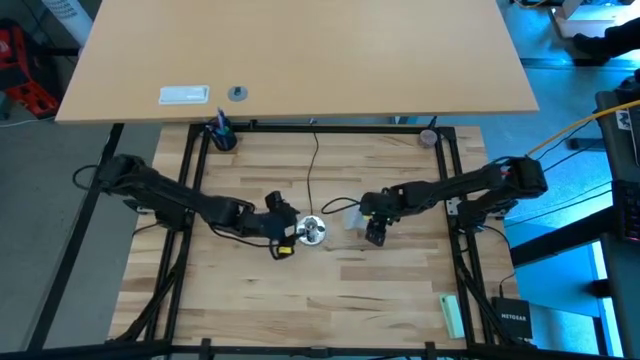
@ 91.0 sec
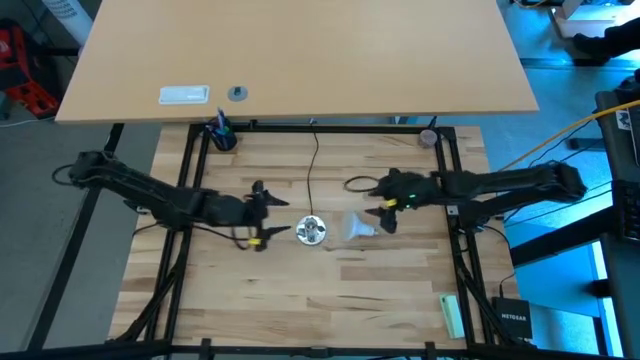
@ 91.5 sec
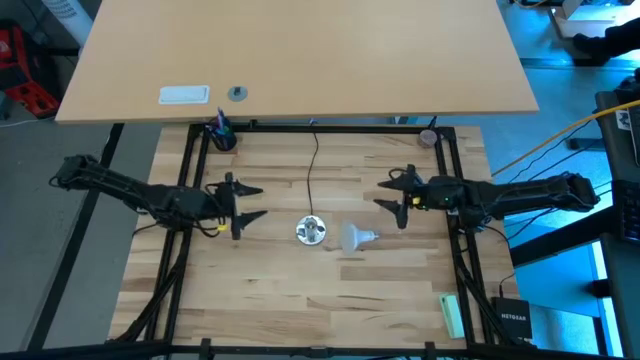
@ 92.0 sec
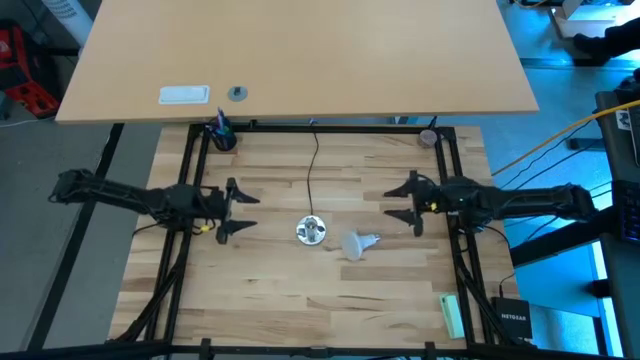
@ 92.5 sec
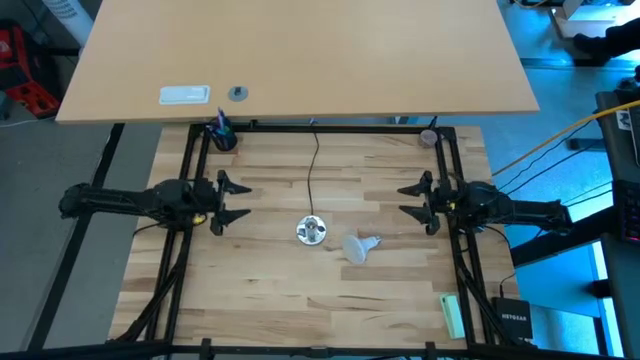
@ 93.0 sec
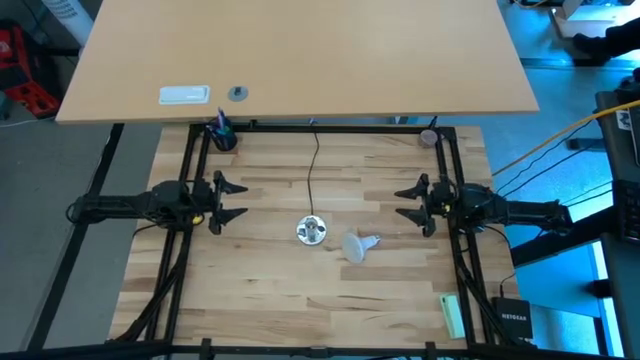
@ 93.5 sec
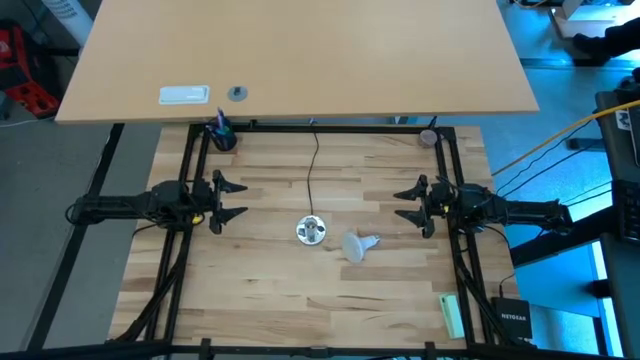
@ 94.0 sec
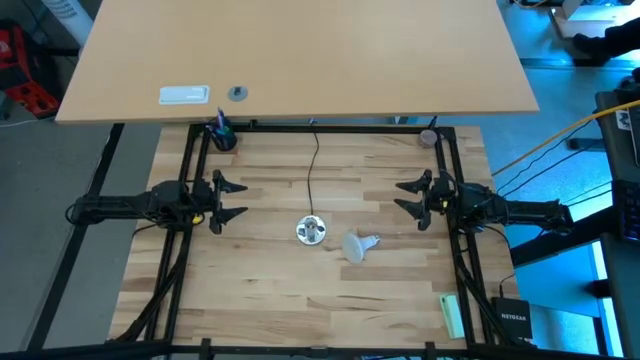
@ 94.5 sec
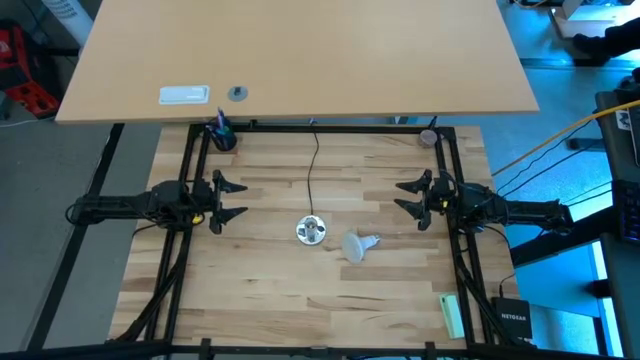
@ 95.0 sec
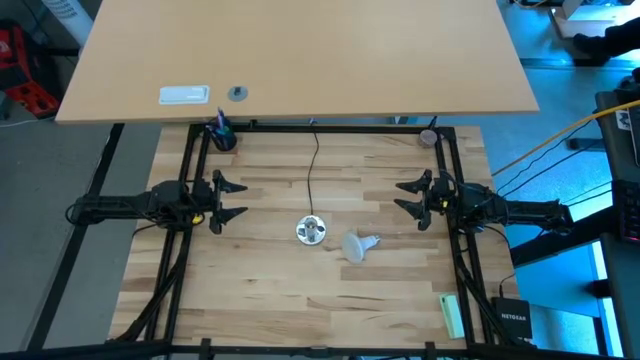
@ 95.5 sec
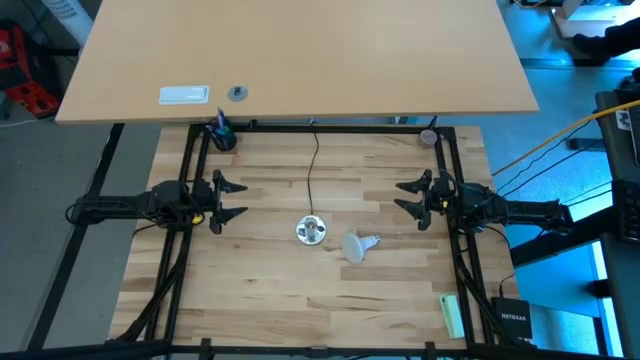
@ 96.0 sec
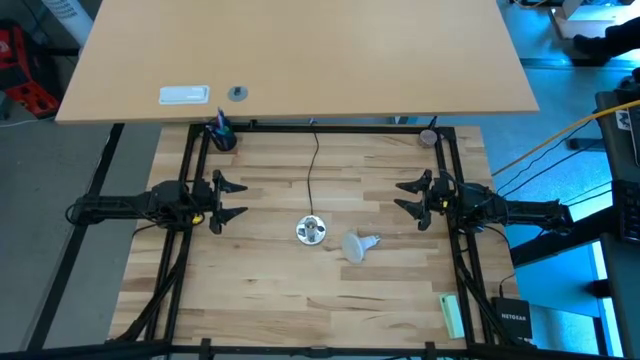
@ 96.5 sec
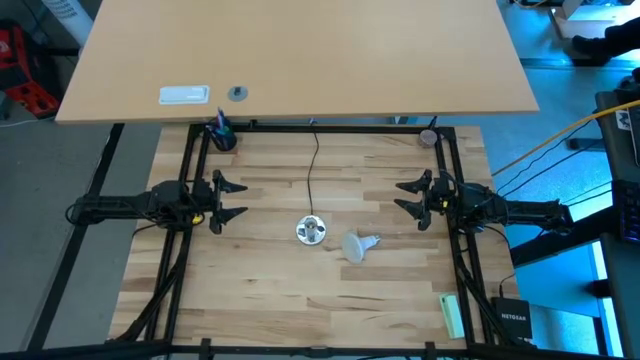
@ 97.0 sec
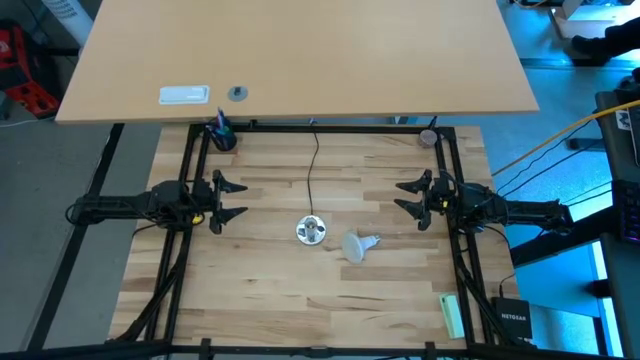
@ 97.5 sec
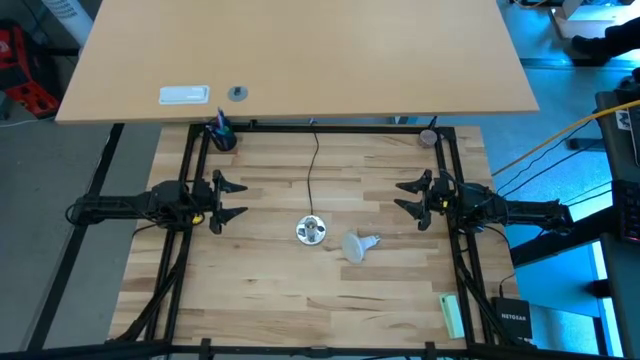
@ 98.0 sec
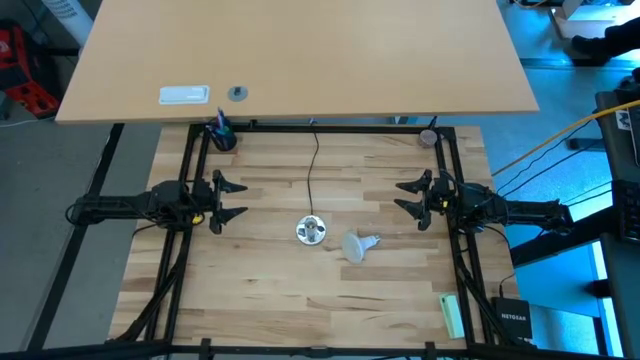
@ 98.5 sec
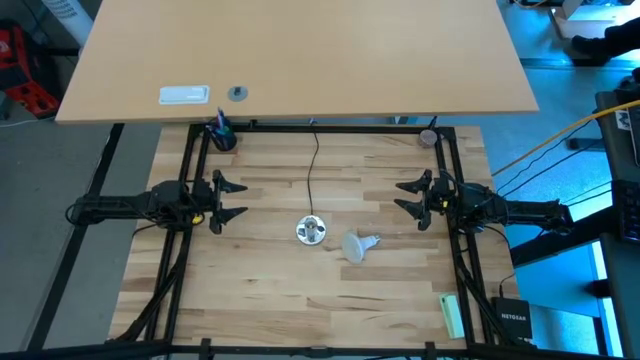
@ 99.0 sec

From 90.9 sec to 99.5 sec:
Task: Screw lightbulb
Return to Home Position

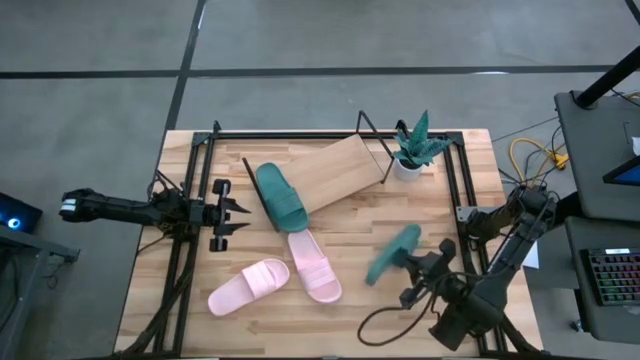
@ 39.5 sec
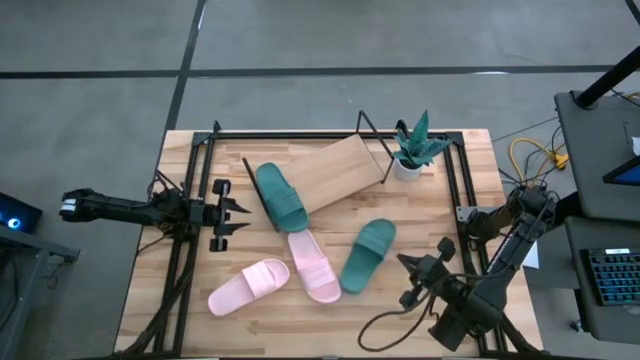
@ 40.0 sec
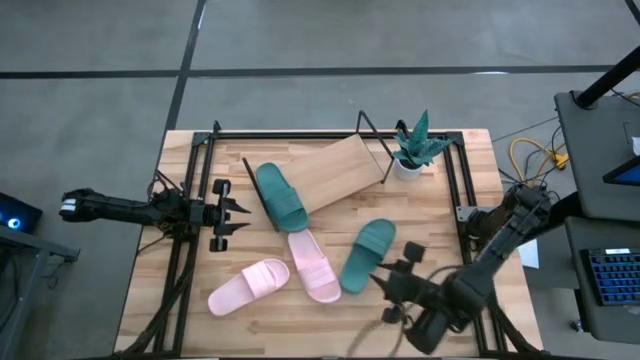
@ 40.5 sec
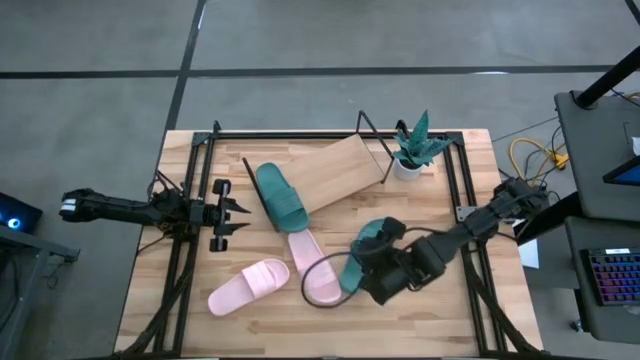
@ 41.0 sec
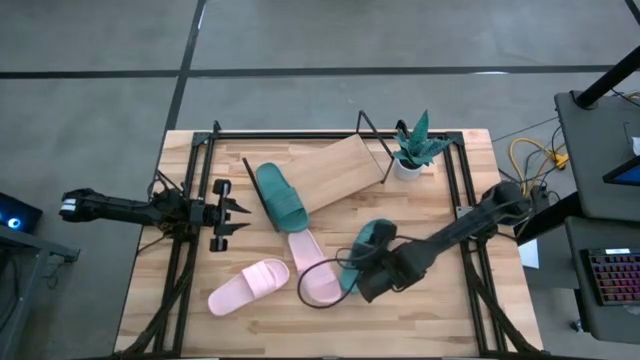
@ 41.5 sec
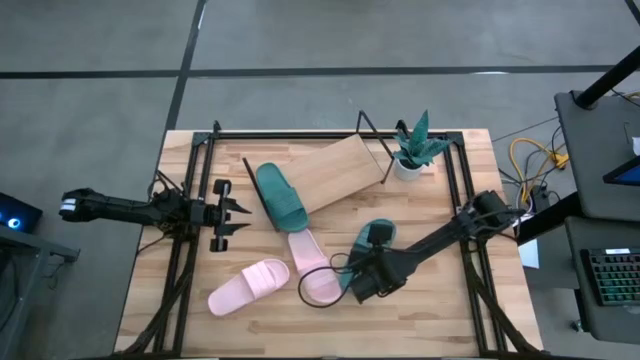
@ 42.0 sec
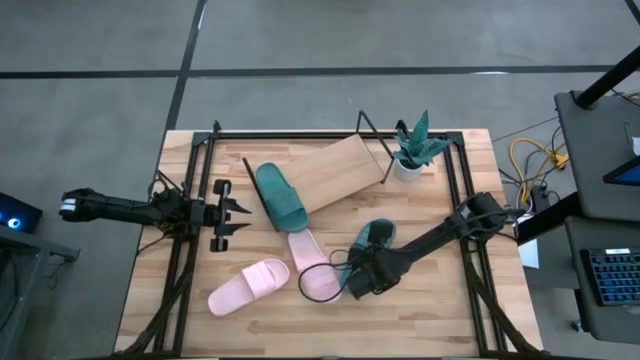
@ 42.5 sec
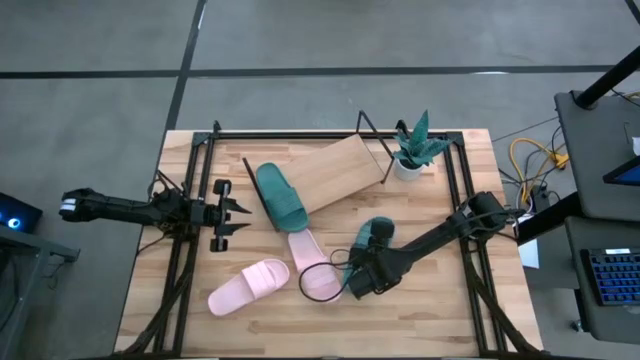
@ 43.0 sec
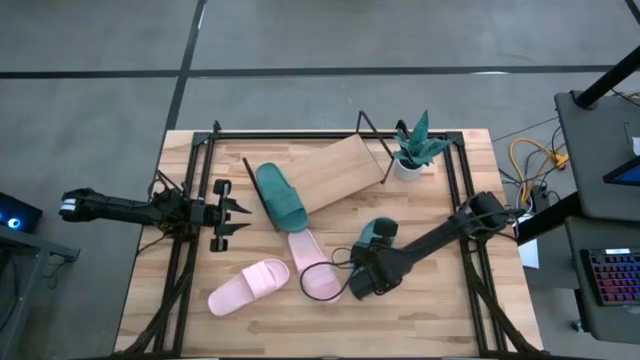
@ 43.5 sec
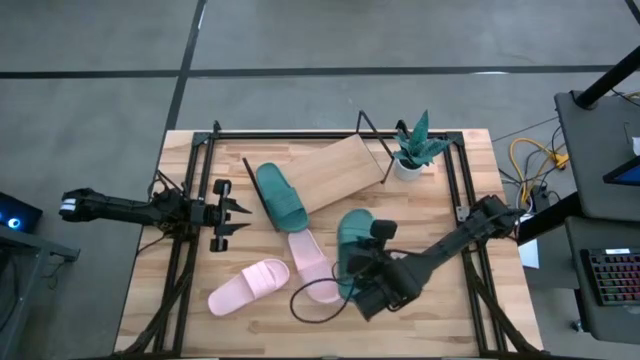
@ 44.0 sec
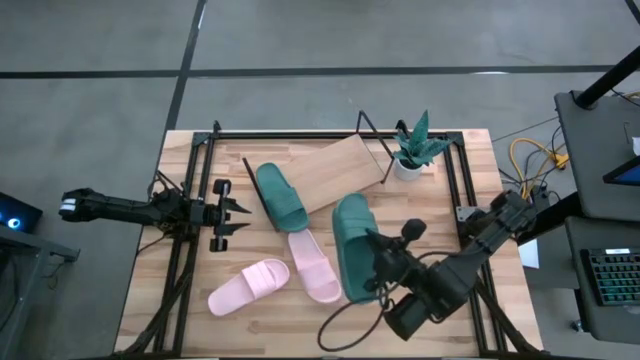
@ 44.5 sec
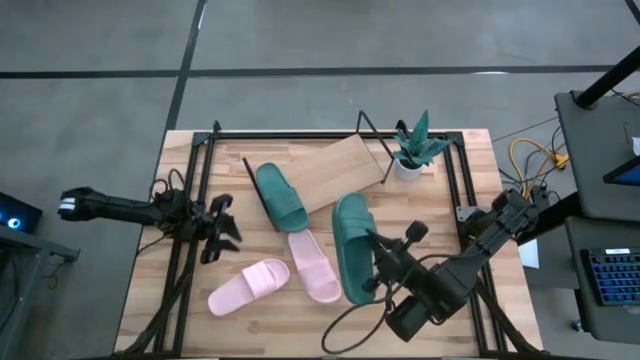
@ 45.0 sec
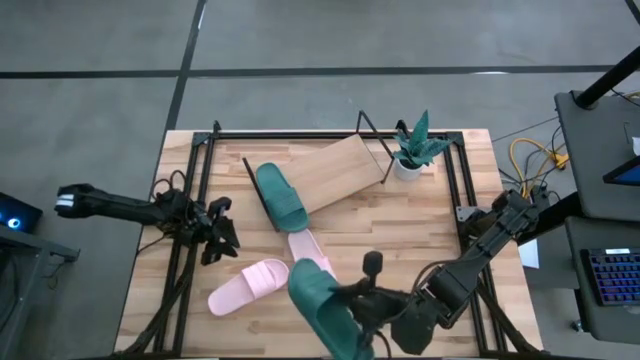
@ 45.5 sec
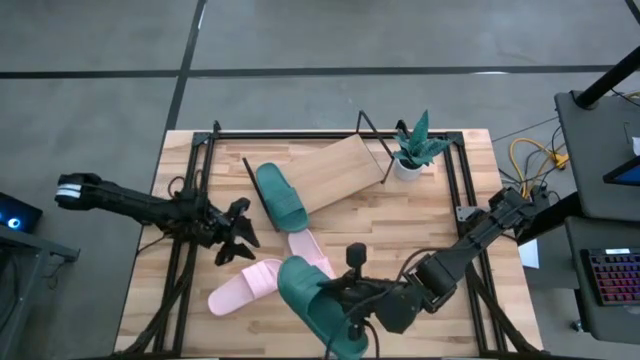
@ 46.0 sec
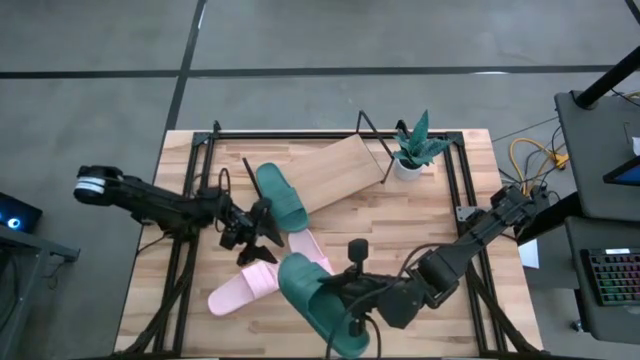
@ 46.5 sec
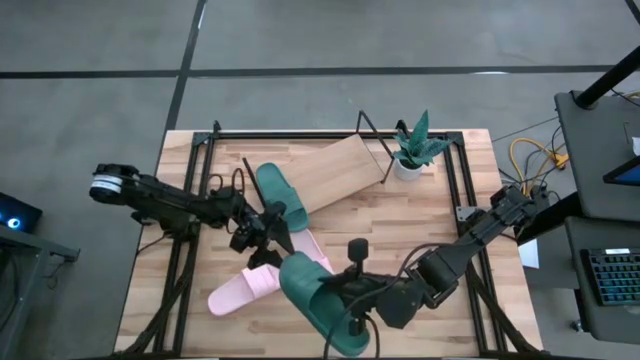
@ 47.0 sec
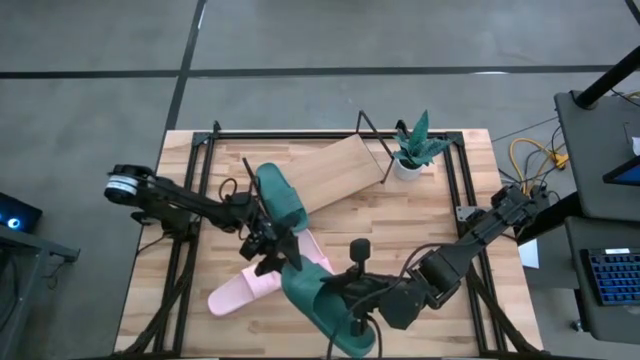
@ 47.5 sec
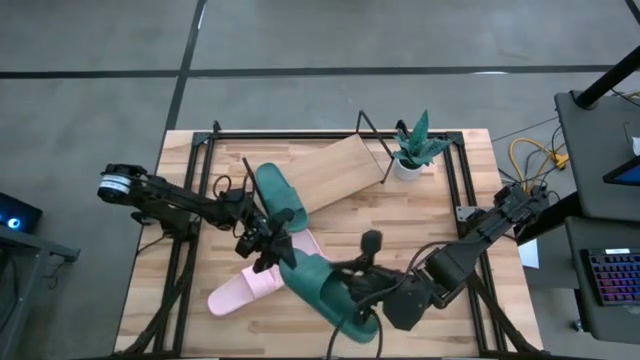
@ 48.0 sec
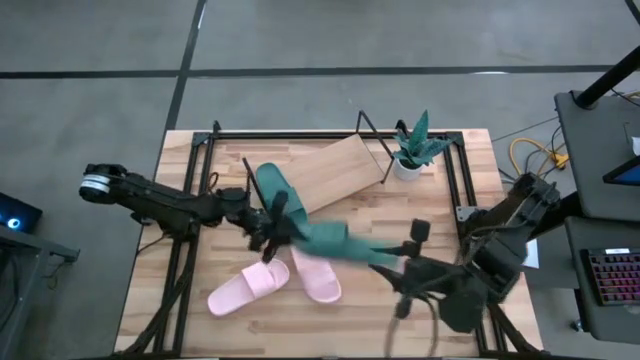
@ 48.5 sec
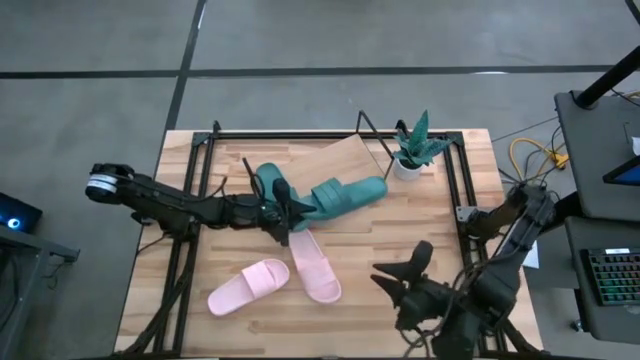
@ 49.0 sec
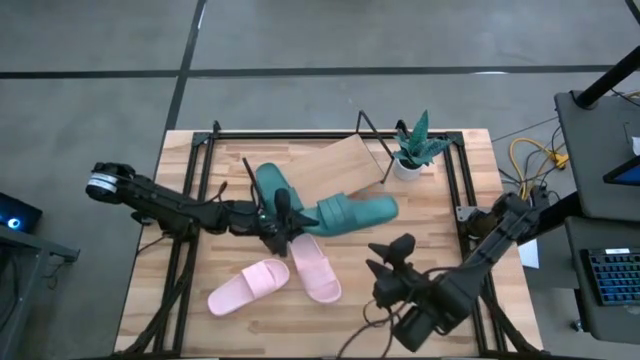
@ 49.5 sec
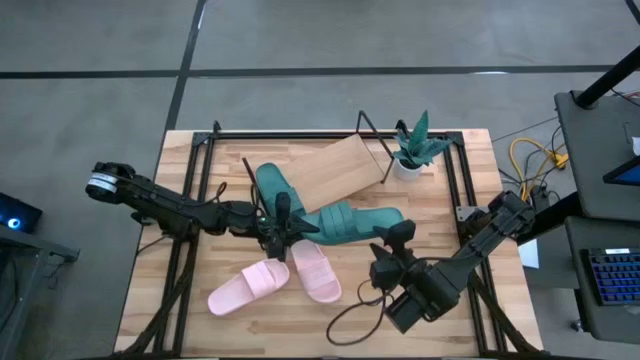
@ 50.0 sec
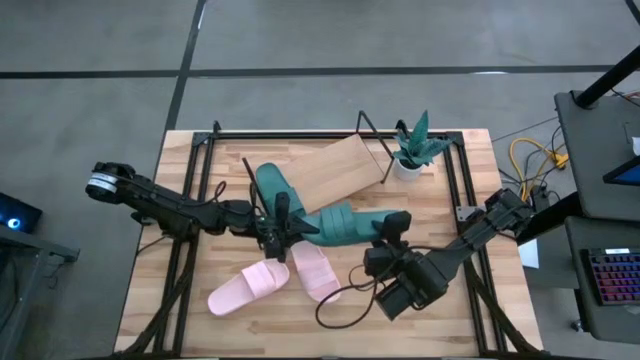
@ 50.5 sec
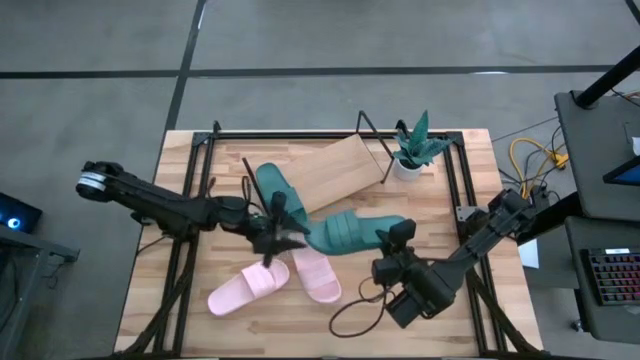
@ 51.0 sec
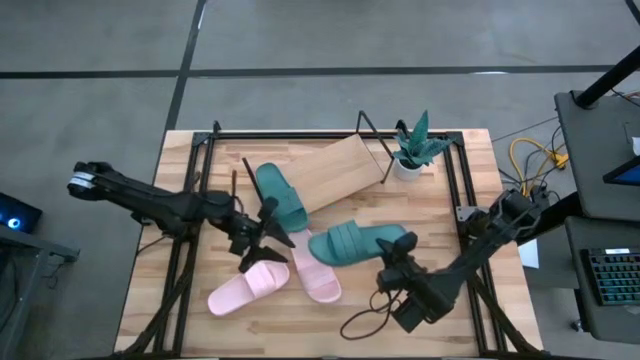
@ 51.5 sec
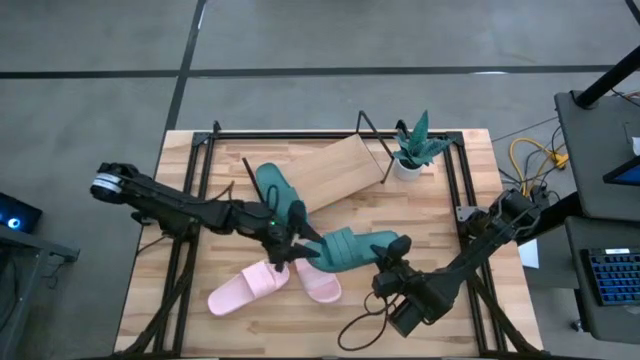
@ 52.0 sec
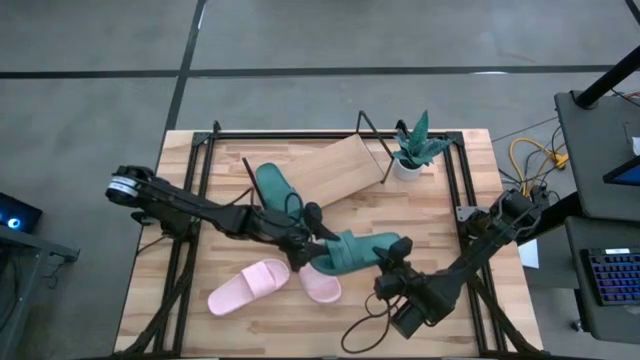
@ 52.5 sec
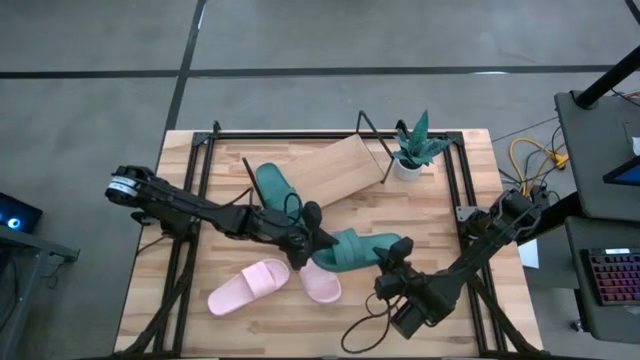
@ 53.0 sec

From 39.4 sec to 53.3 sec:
Task: Pick and place slides into the shelf
Put the green slide on the shelf
